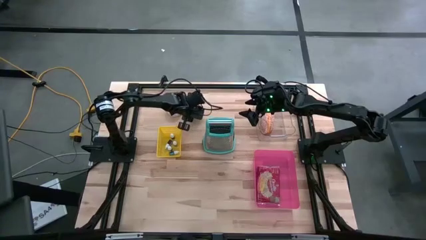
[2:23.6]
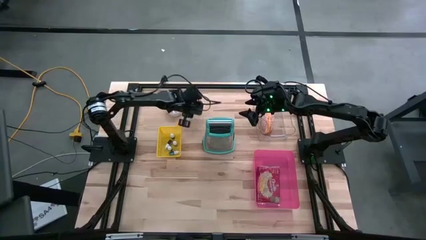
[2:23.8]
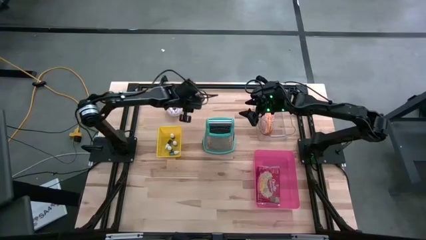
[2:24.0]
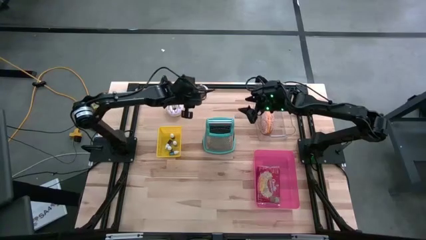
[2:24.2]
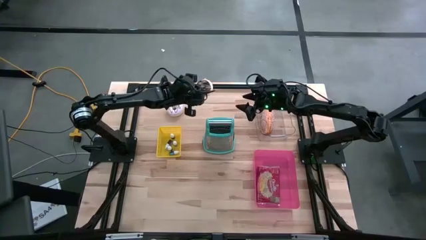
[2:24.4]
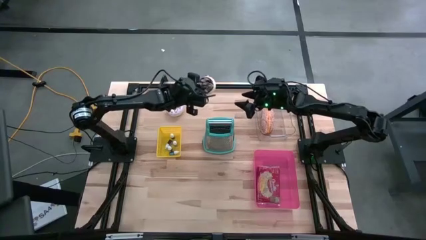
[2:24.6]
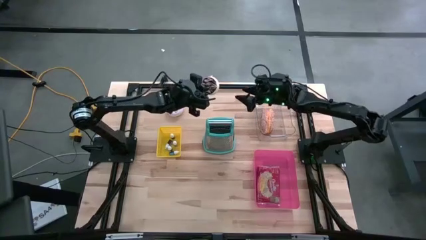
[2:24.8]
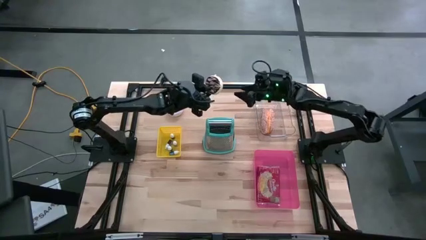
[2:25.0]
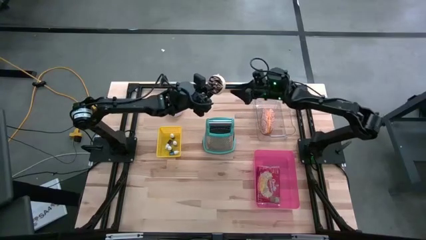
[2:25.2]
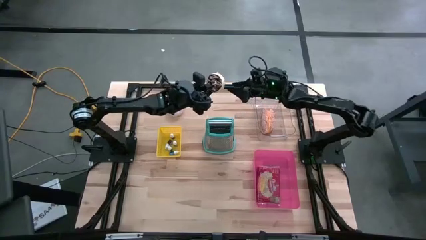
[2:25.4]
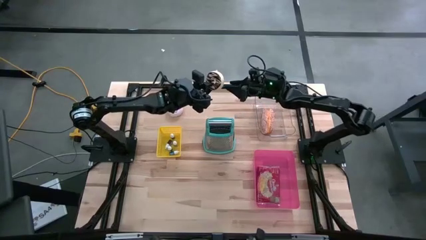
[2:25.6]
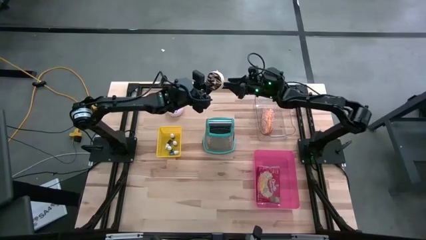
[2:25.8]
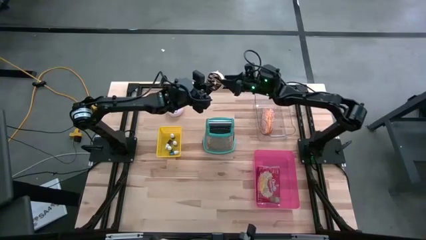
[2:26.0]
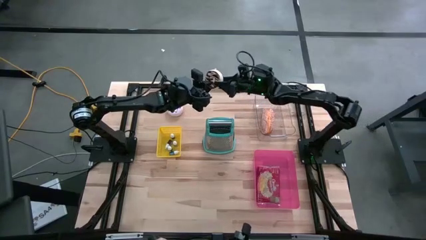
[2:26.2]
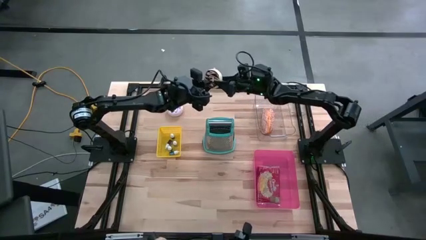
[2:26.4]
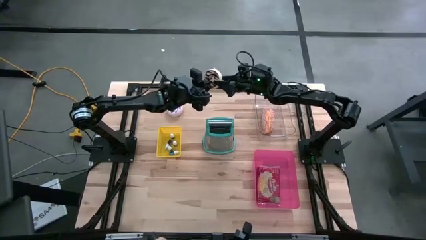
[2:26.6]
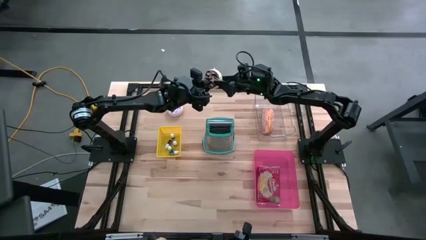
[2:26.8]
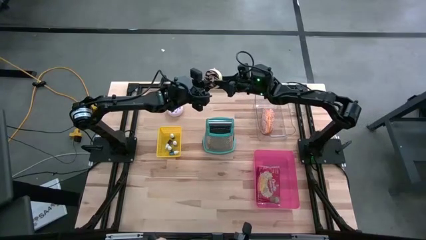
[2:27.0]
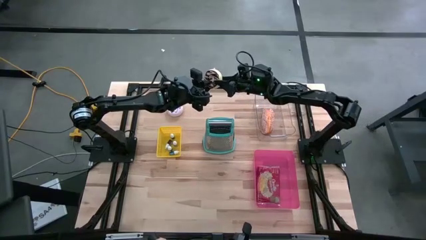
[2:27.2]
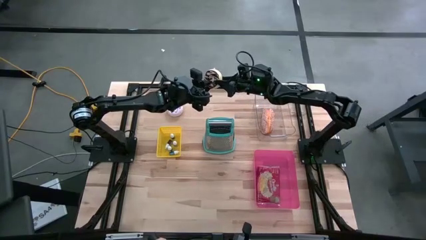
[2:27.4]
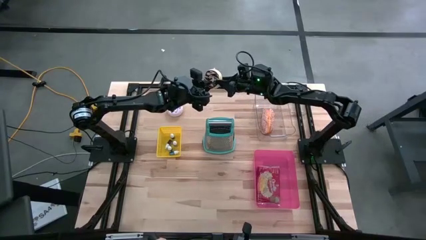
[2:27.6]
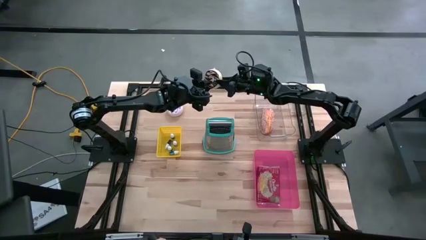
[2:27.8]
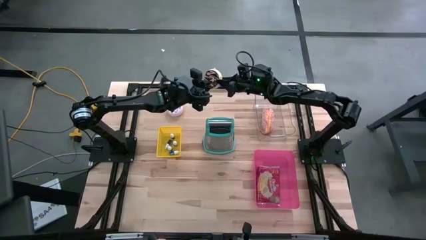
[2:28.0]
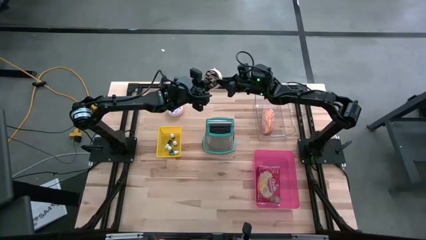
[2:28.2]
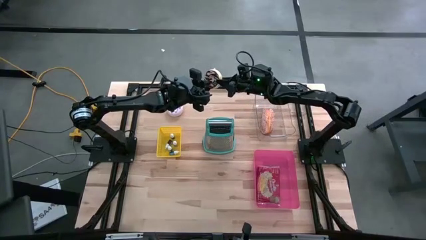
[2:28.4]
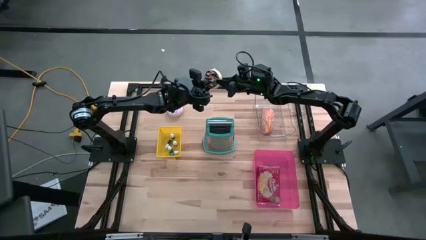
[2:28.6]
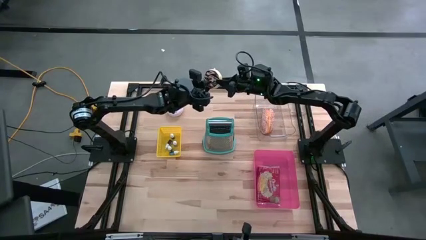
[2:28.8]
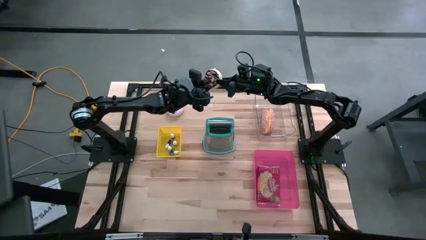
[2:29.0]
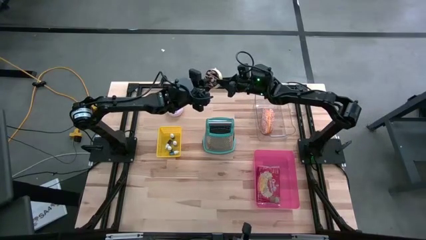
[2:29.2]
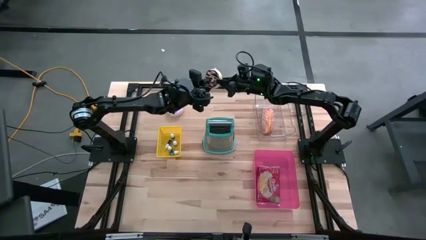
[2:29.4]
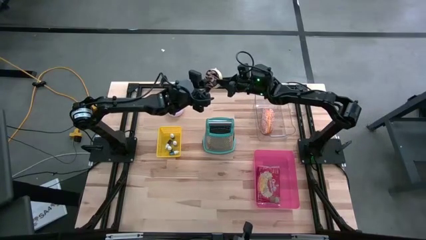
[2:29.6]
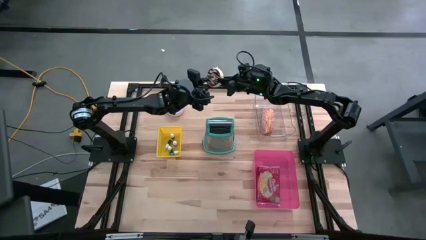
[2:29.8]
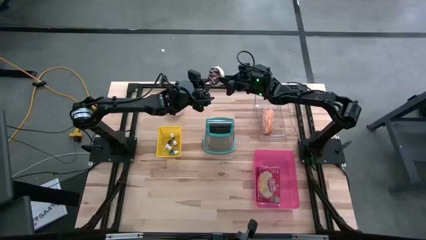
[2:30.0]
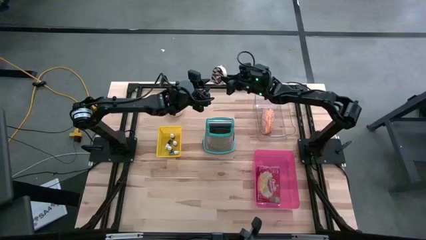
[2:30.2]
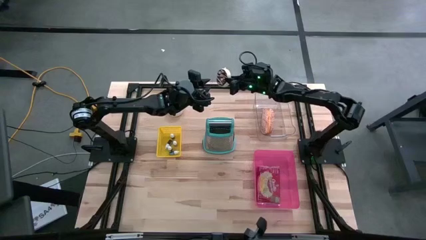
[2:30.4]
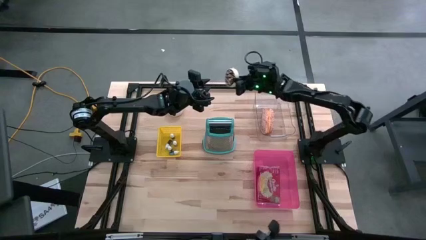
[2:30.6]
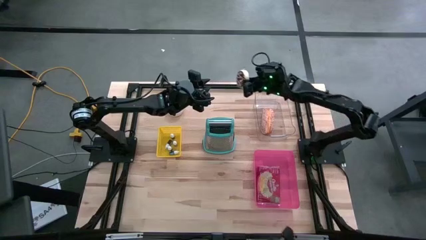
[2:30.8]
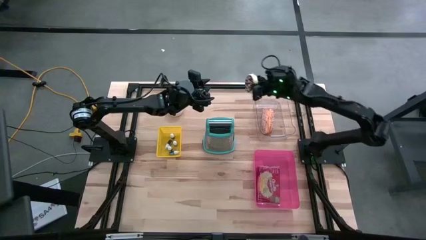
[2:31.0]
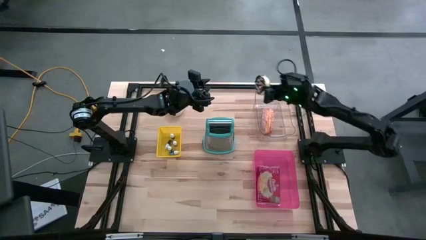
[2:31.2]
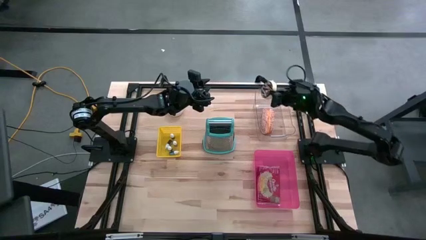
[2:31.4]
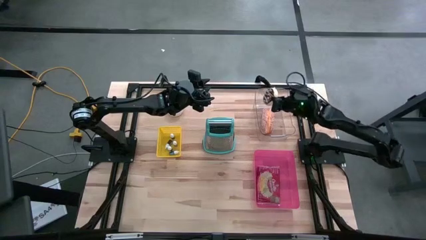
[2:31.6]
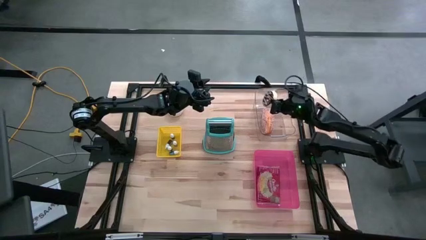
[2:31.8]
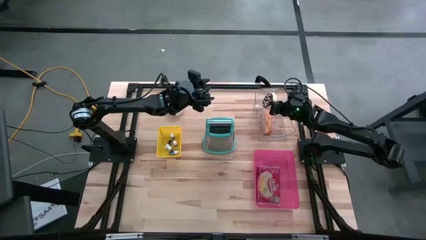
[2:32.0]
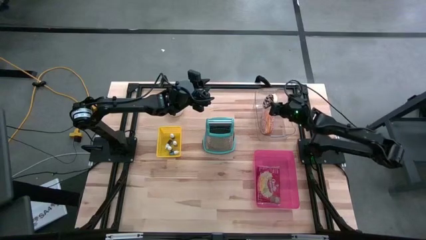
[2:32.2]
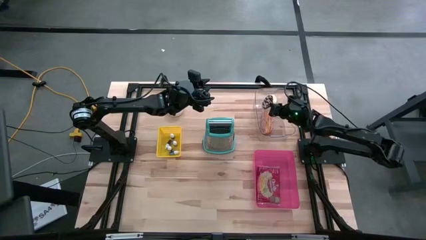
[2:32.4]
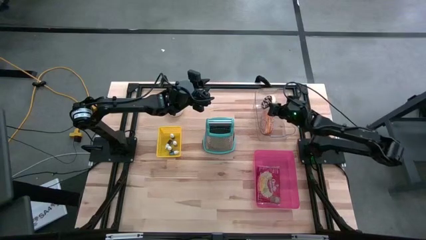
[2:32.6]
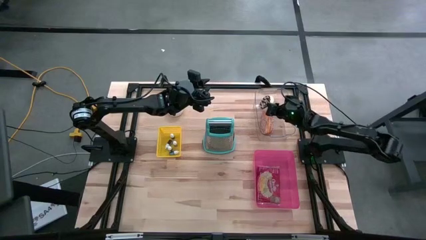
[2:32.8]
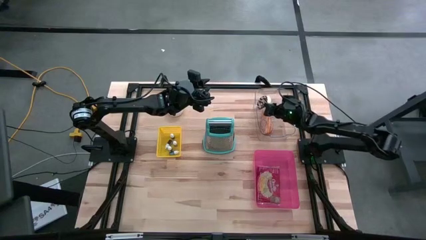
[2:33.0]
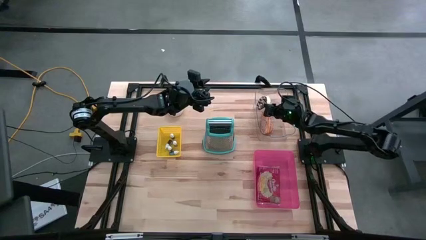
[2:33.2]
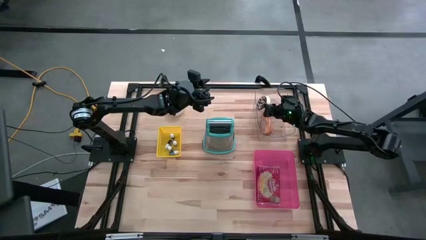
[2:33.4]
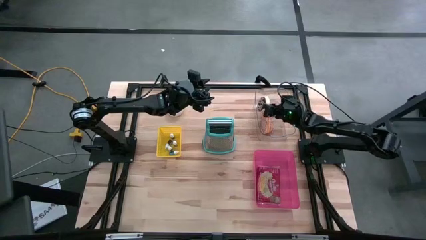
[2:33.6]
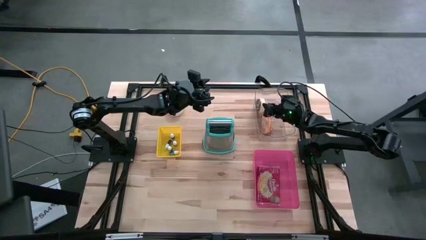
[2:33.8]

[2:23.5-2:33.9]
Put the dark brown donut into the transparent bin

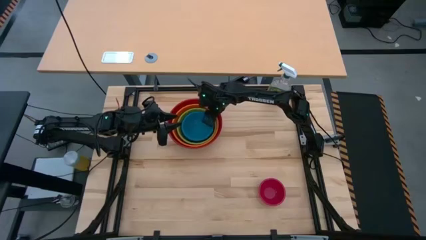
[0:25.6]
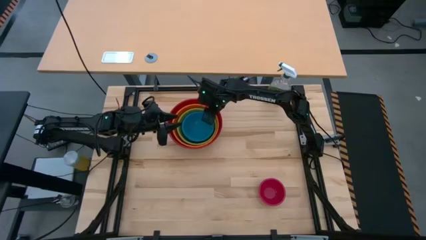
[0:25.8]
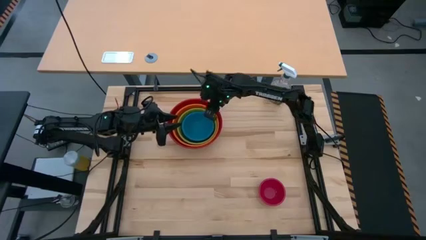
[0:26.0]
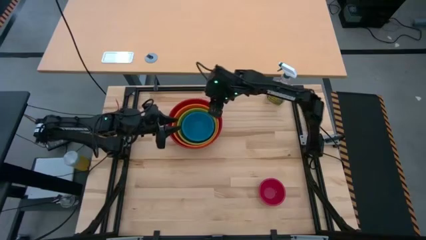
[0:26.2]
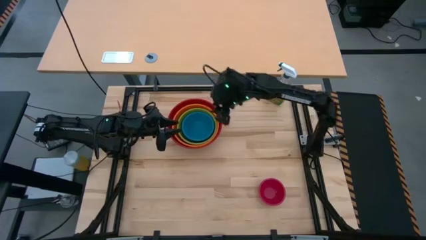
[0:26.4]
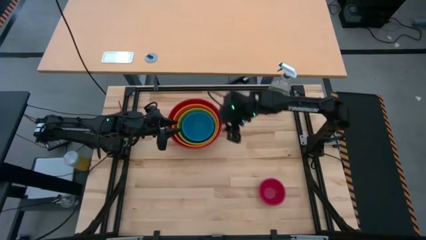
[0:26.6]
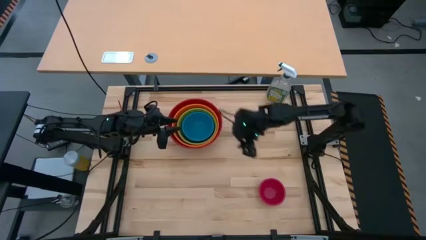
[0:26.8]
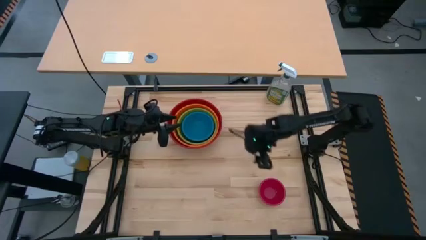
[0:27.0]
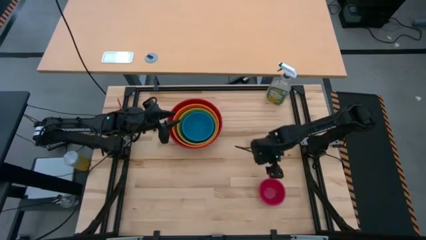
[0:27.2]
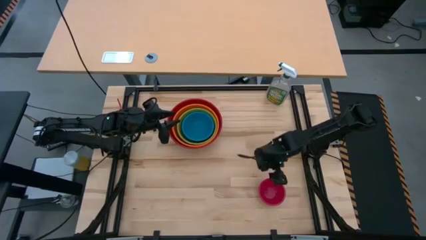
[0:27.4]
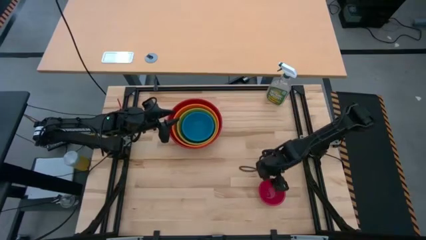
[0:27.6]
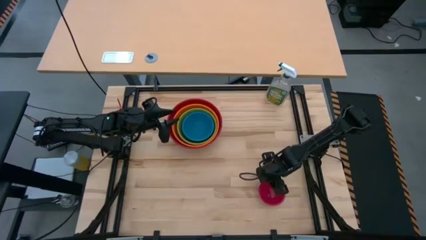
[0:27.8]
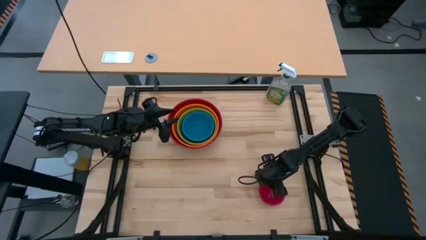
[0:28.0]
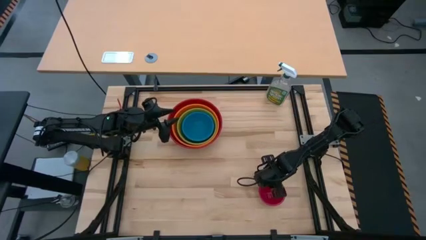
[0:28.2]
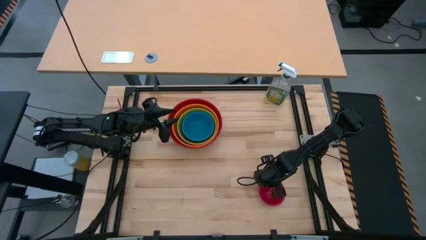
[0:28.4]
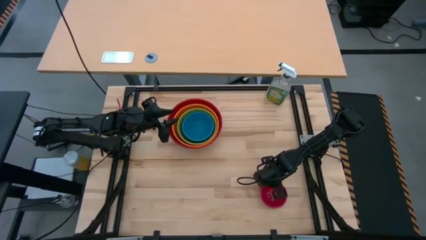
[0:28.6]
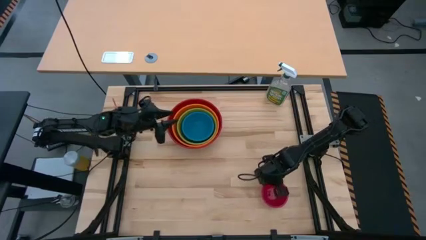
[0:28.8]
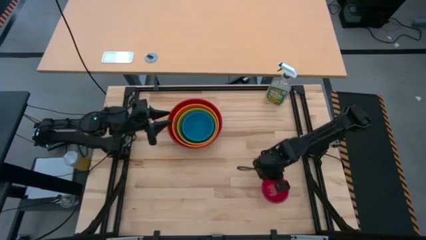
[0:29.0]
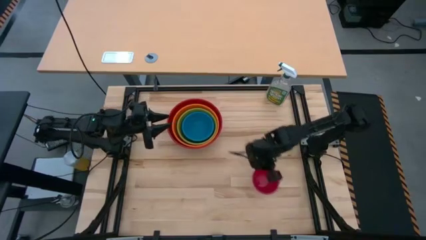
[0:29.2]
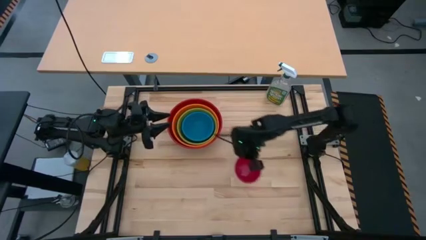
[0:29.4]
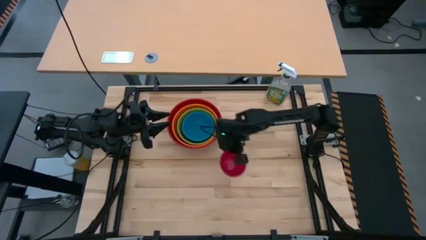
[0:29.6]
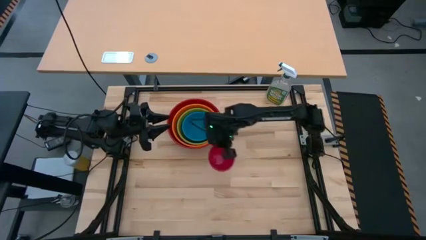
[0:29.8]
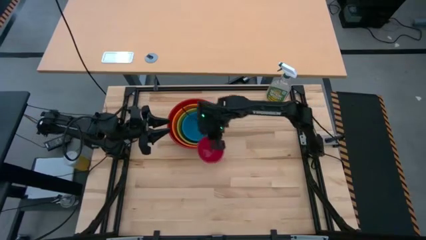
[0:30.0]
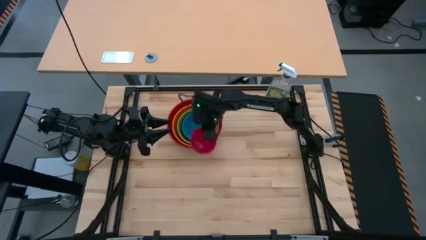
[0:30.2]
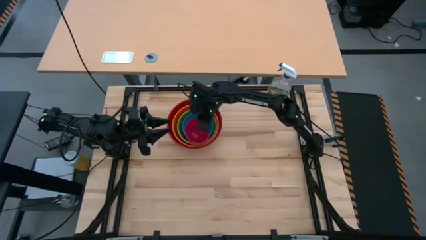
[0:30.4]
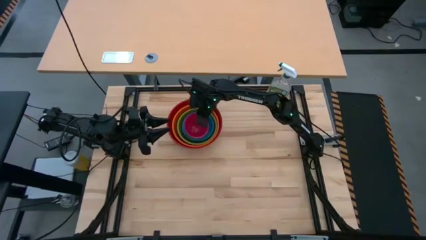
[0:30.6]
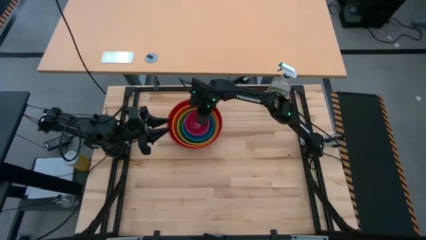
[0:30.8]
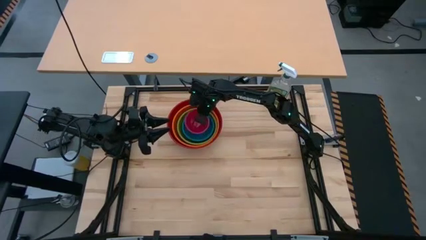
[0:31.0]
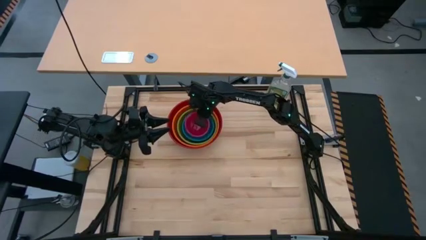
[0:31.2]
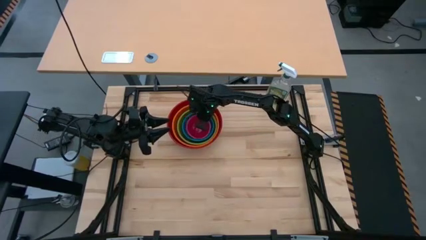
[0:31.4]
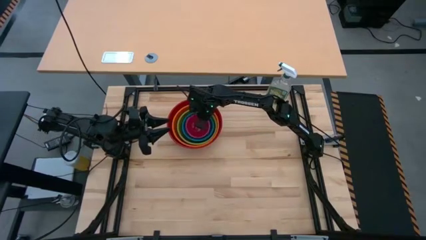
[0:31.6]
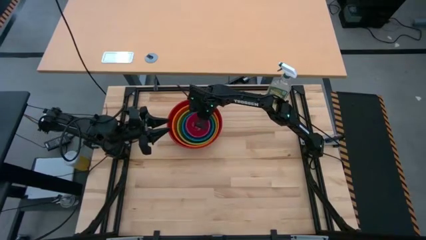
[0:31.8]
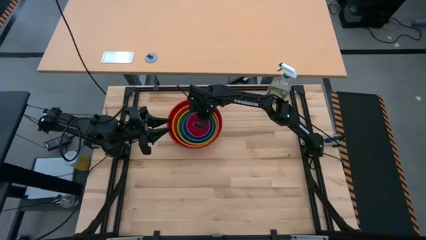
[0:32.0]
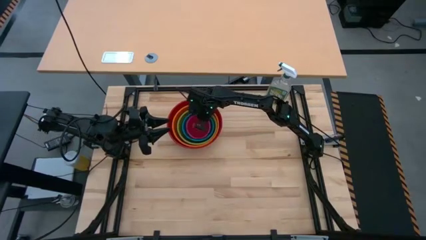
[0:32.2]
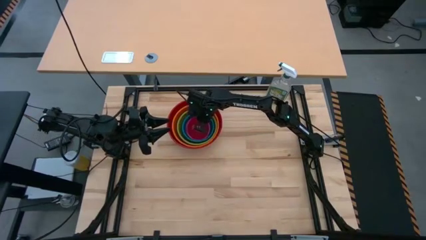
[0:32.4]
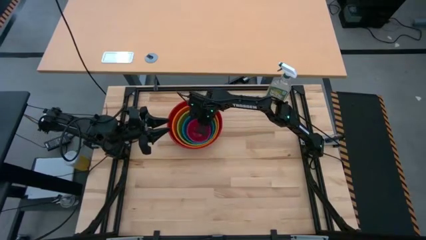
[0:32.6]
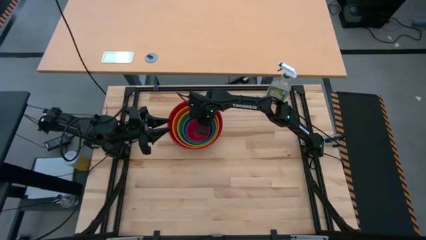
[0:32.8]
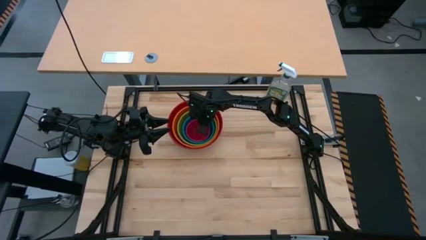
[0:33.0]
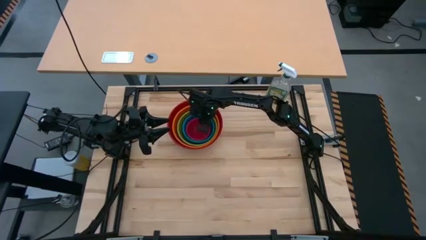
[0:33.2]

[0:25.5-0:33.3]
Stack the pink bowl on top of the blue bowl
